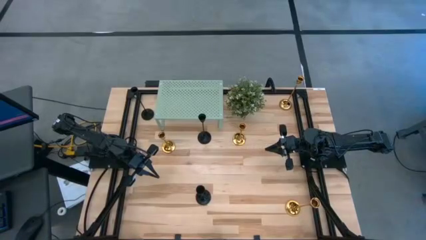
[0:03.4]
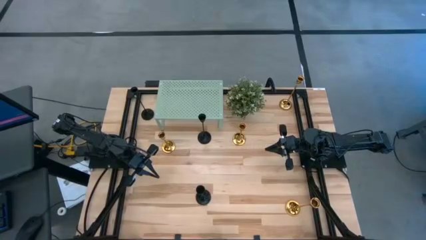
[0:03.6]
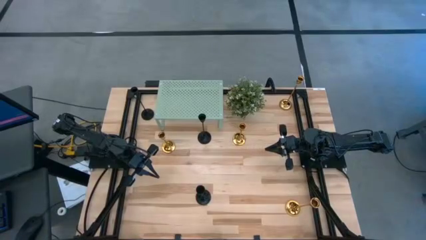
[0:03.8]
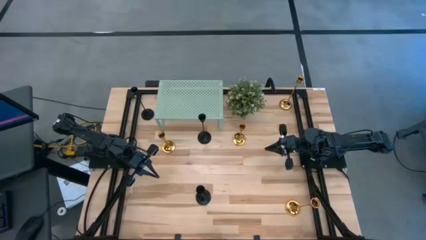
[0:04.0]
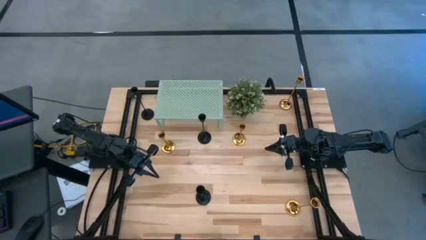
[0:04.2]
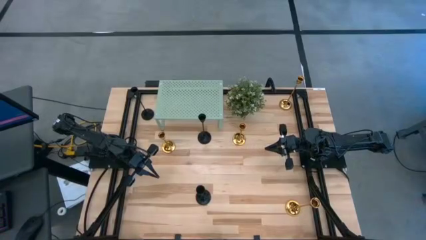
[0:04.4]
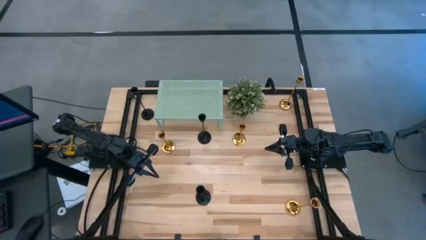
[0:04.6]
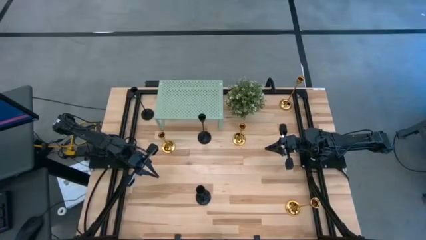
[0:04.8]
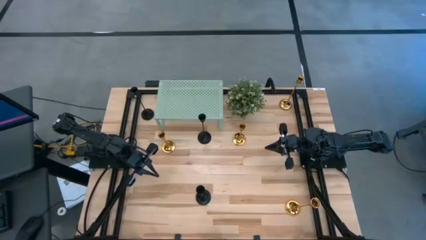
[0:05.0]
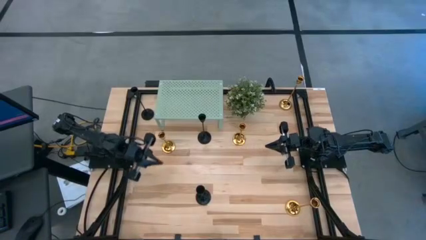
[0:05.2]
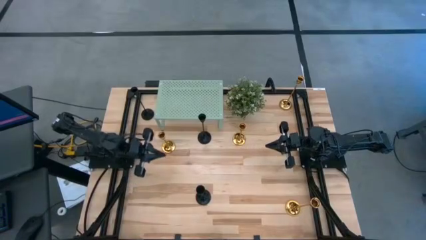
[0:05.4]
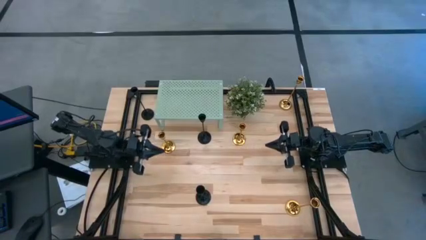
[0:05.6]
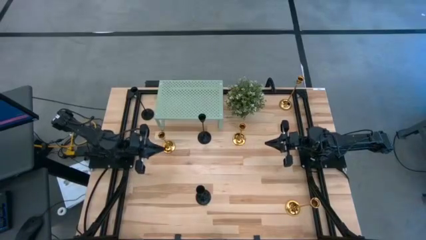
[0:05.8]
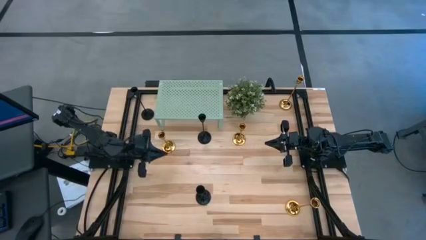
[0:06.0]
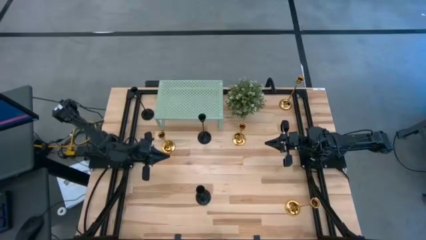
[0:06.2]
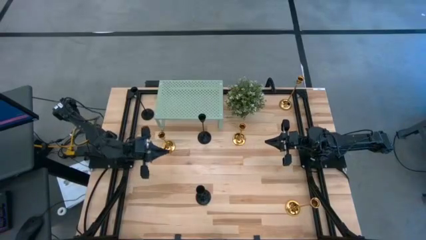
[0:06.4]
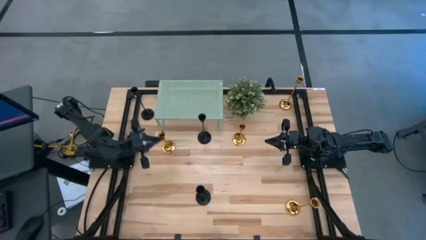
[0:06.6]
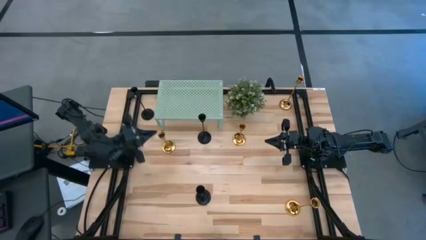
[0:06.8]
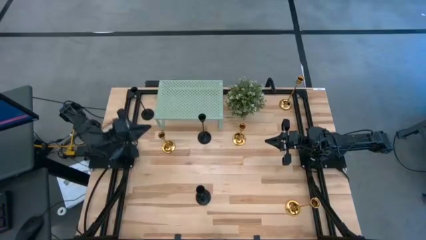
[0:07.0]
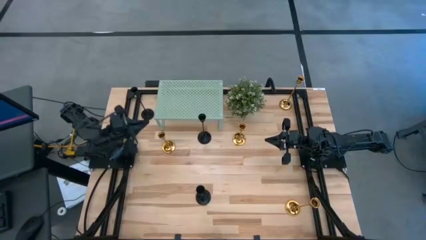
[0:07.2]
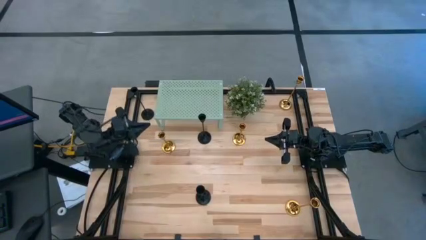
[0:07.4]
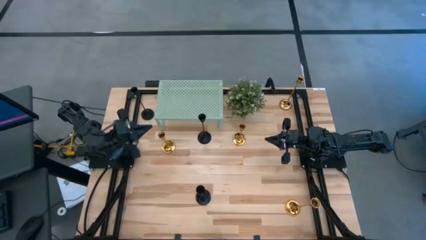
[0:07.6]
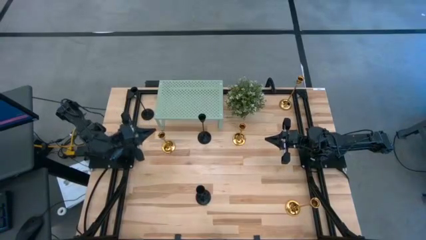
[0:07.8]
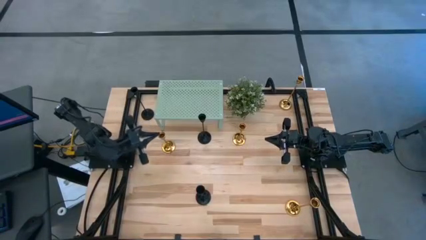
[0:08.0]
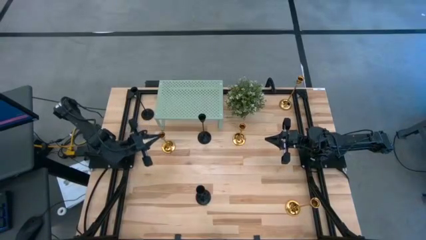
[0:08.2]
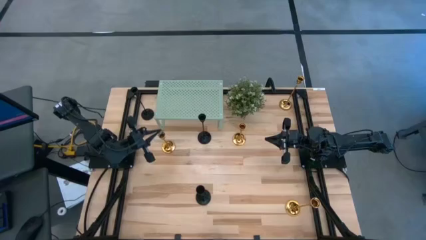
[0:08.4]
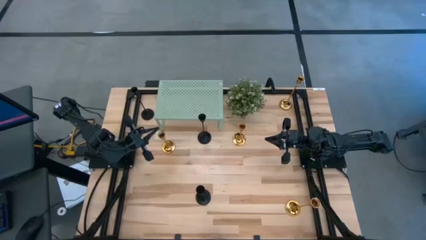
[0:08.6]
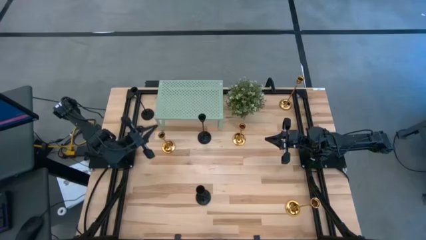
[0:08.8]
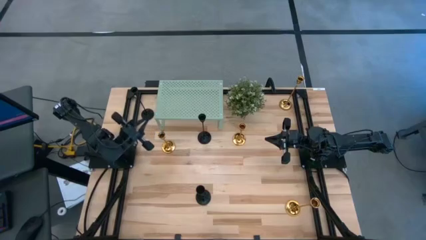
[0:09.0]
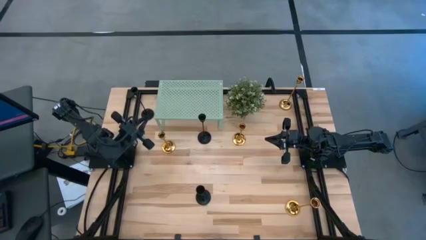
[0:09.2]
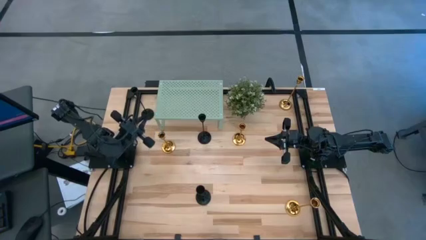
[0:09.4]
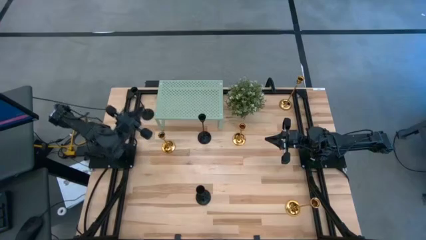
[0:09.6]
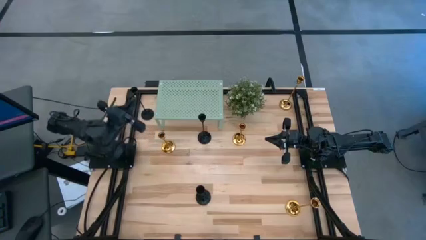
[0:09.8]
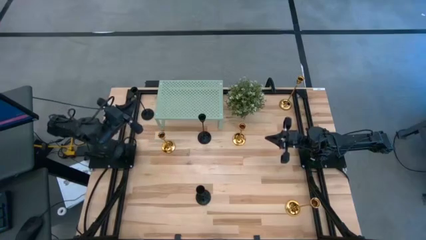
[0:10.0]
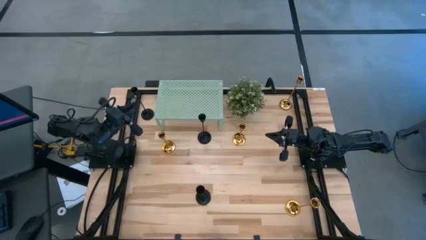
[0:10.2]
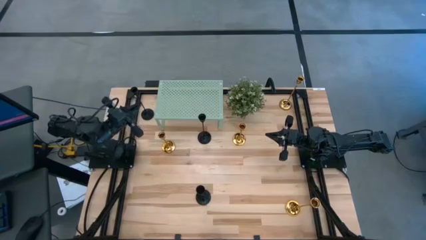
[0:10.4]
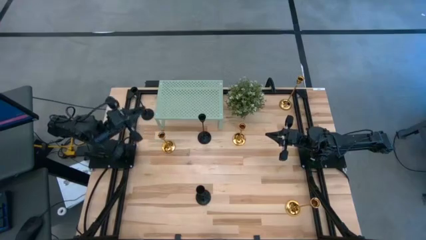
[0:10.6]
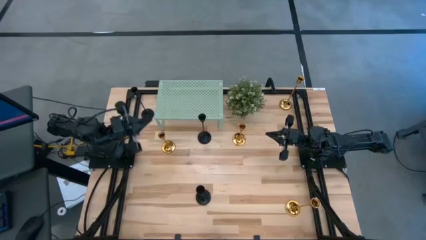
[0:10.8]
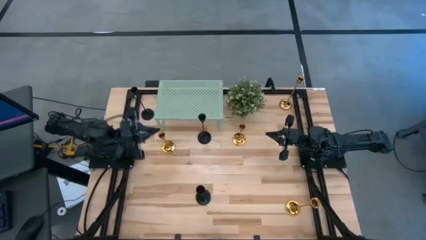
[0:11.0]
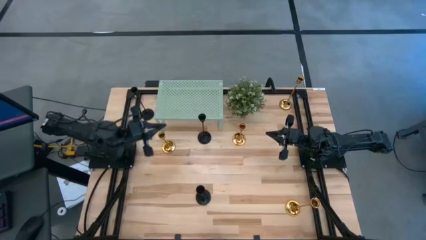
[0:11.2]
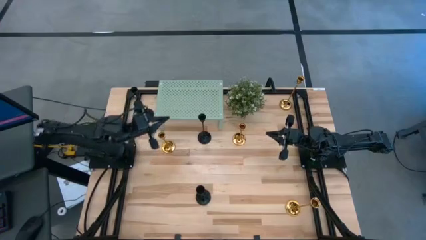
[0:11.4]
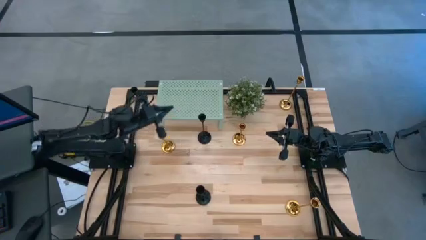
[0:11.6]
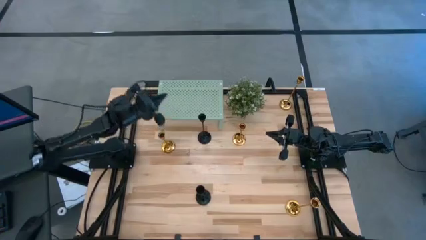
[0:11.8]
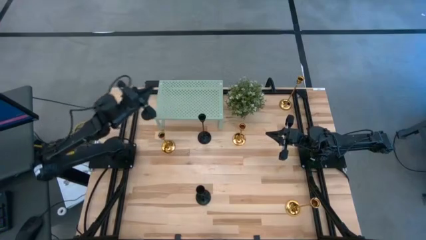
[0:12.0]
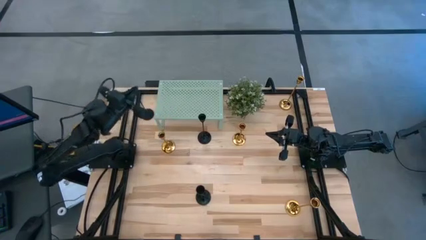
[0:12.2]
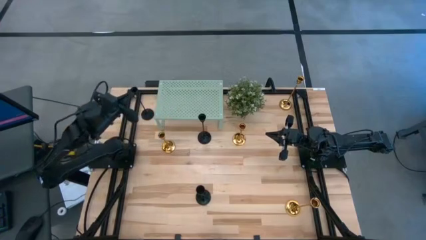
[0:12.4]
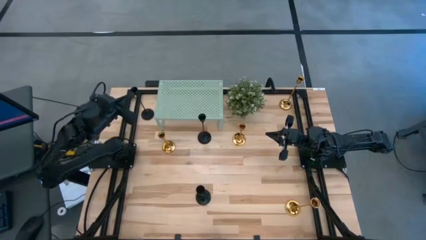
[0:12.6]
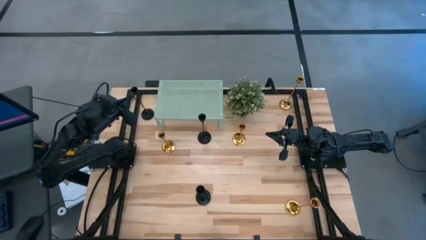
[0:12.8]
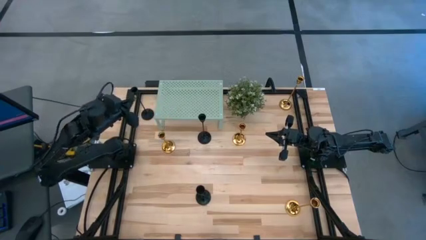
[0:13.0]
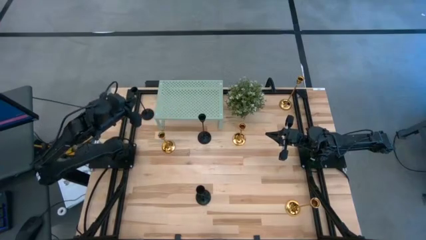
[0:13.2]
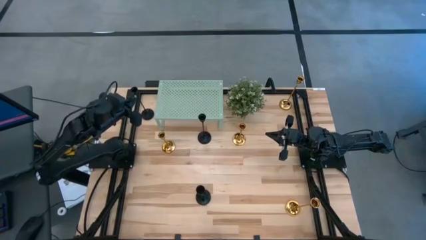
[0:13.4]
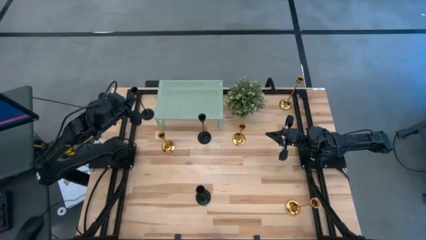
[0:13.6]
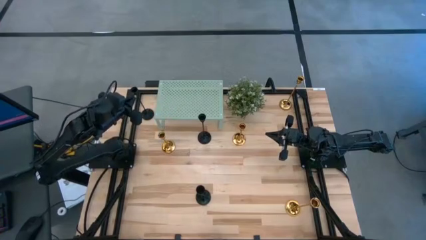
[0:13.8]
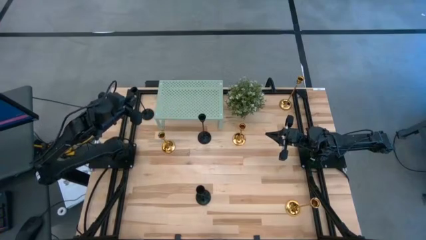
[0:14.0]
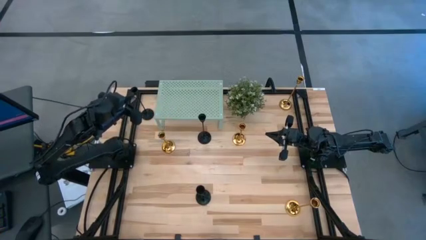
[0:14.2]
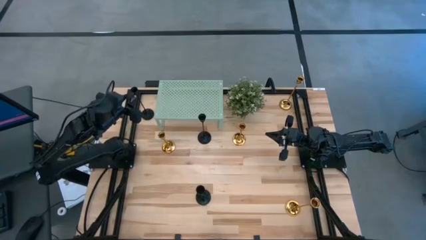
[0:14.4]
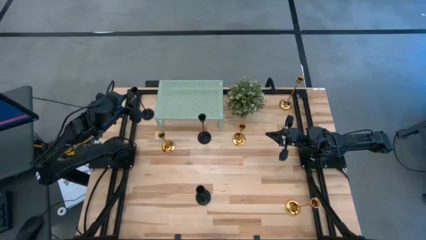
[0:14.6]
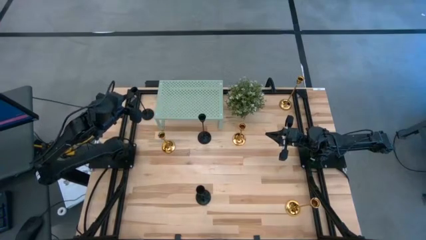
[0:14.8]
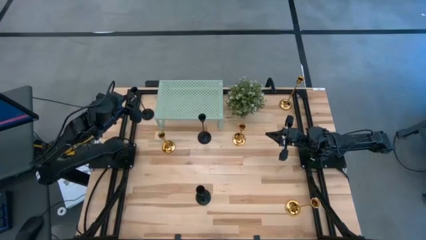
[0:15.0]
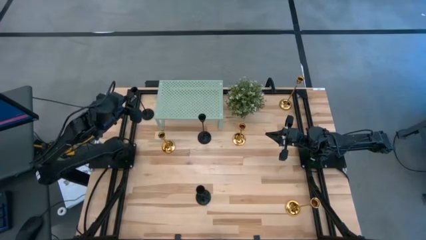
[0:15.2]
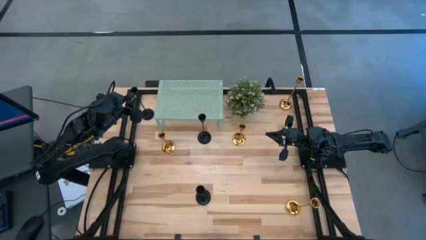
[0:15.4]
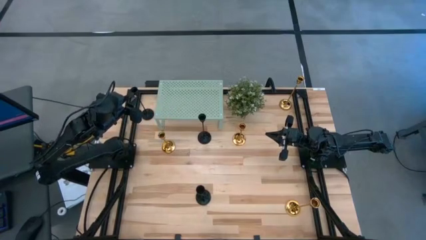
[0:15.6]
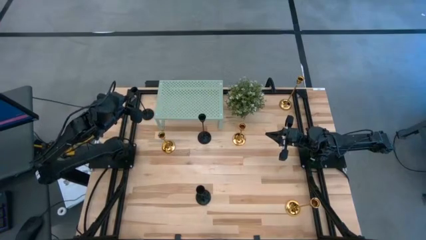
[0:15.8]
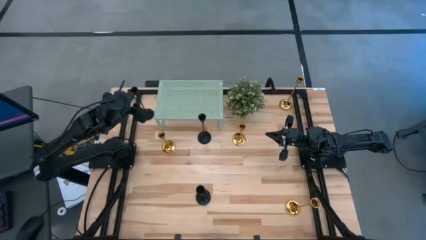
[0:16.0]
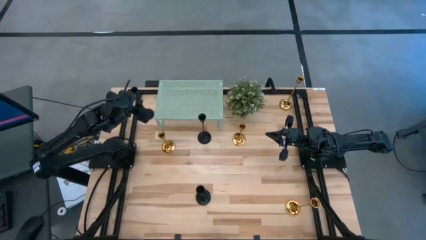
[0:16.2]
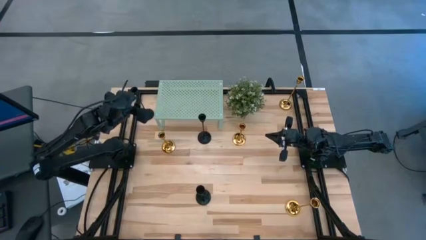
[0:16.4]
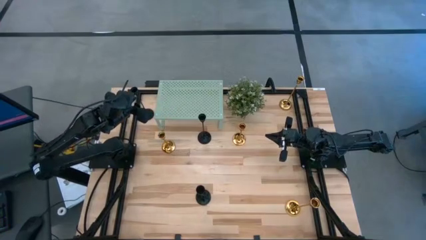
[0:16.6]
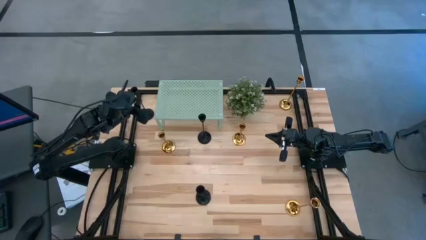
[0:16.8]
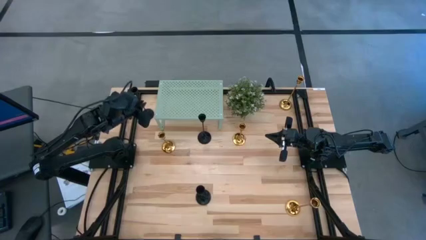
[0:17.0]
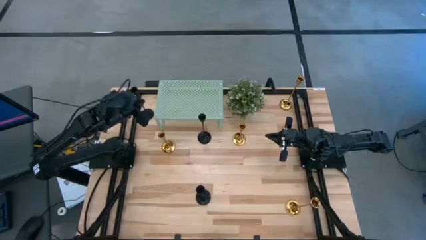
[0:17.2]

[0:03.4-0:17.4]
Task: Pick & Place candle stick holders
Put the black candle holder on the shelf
